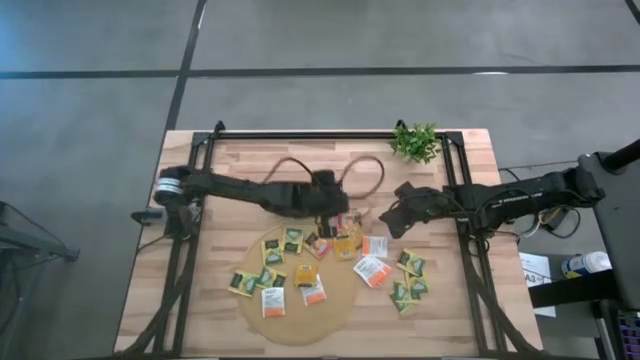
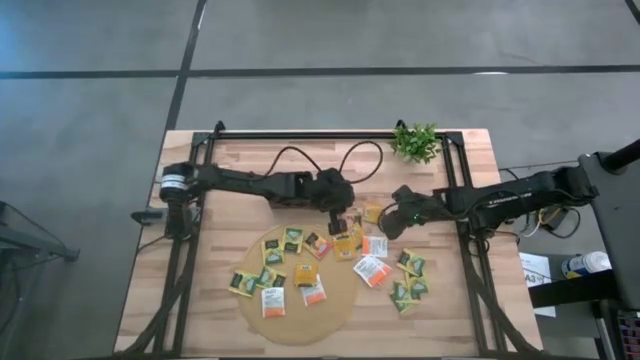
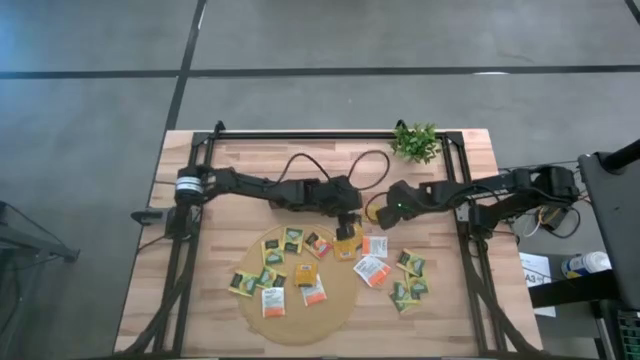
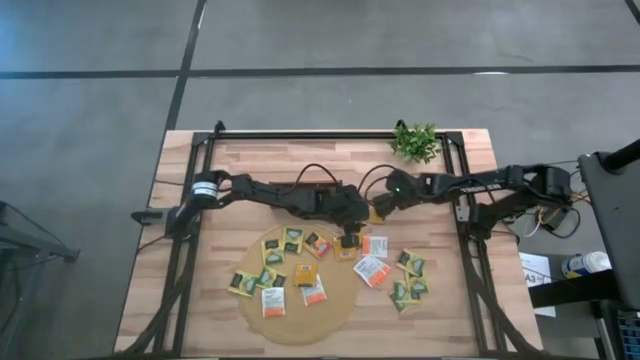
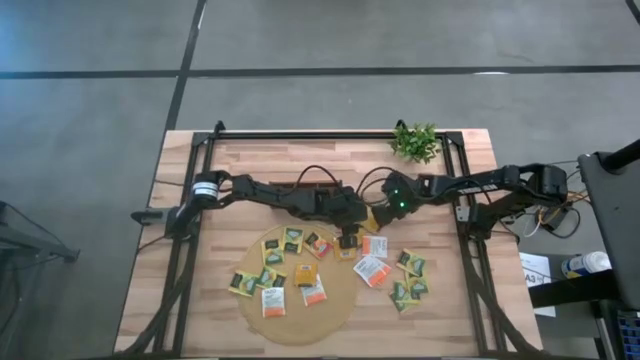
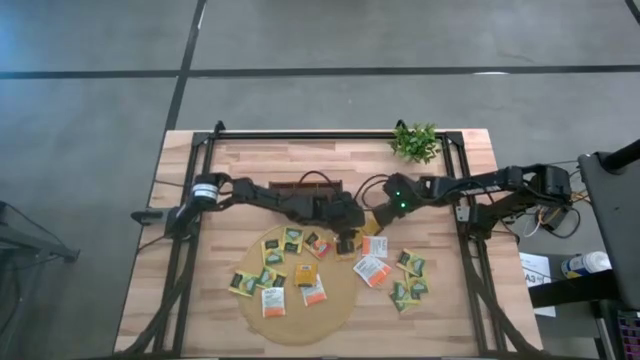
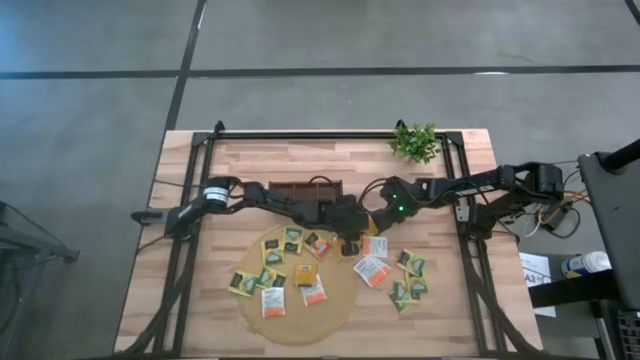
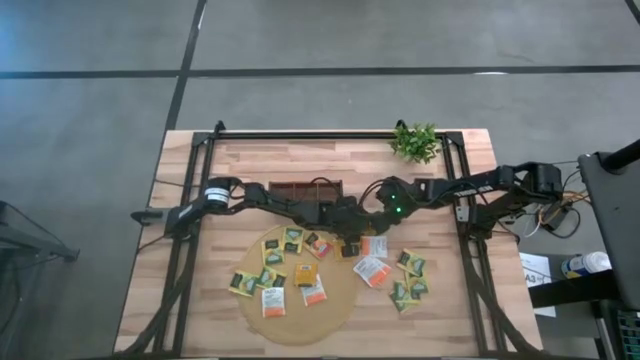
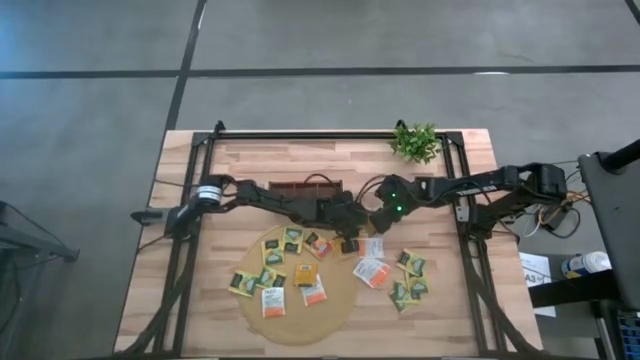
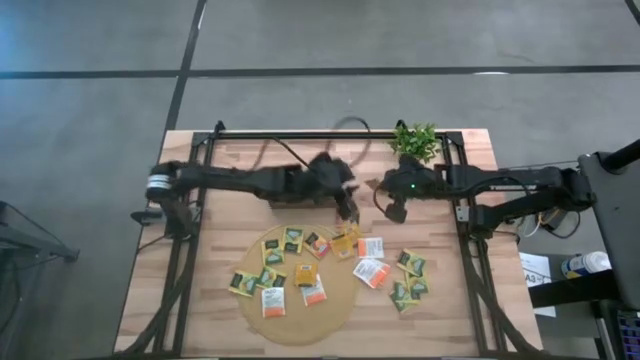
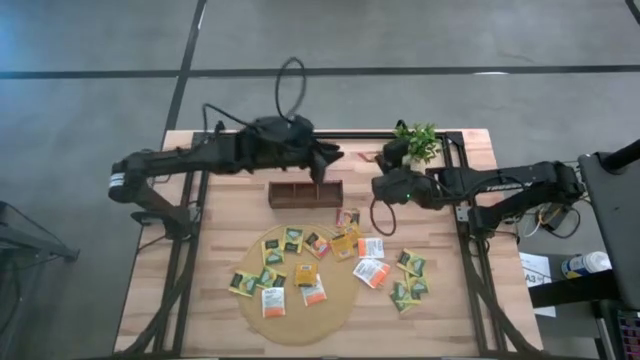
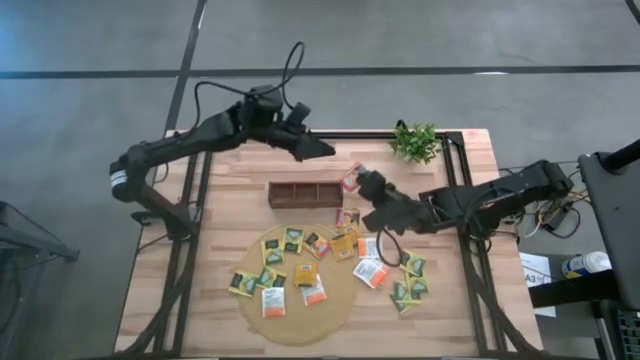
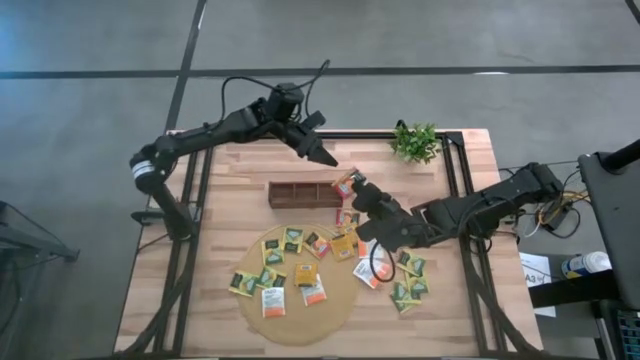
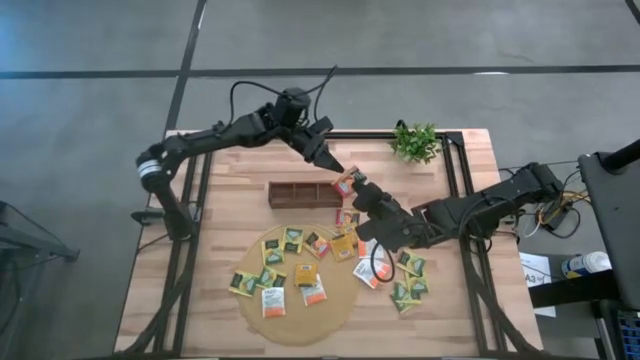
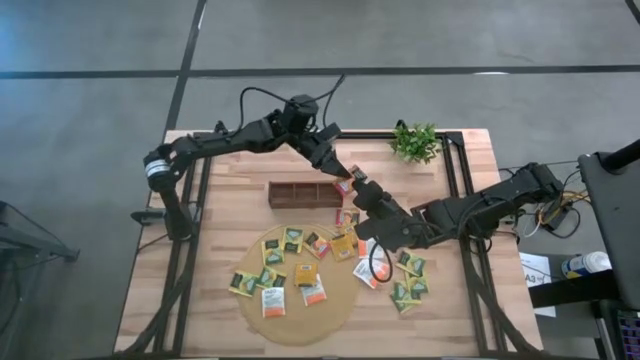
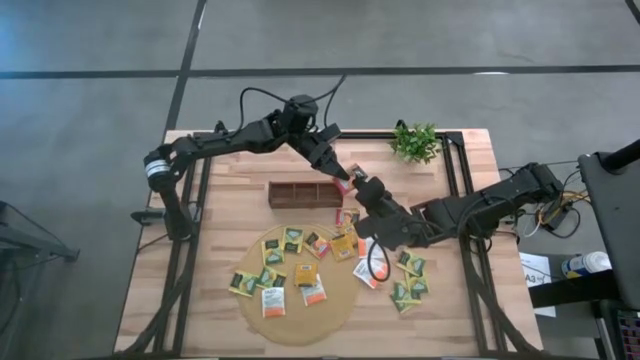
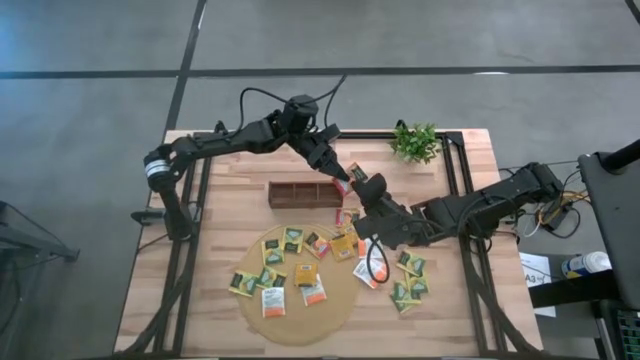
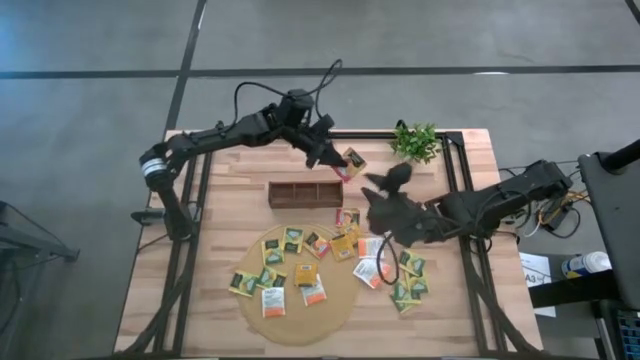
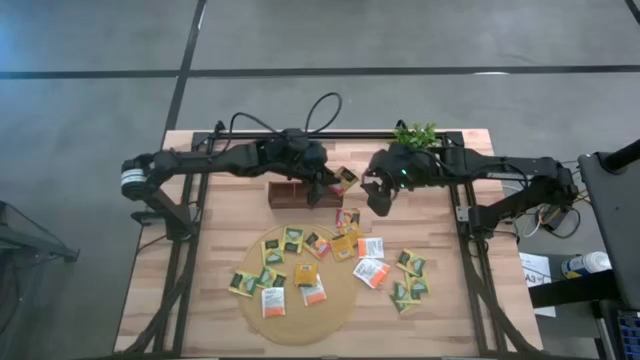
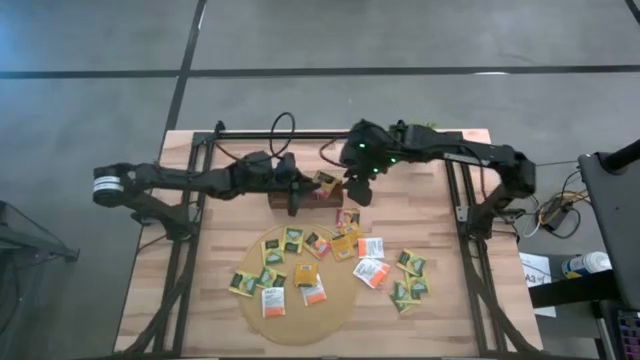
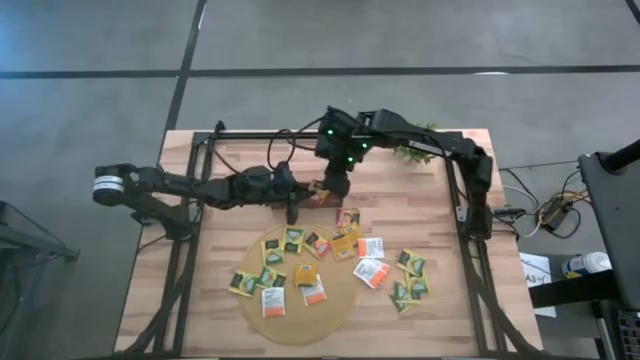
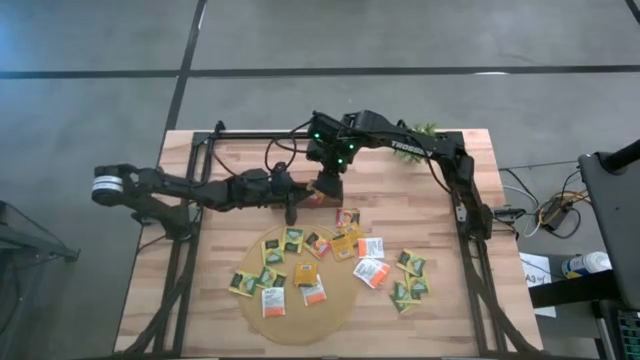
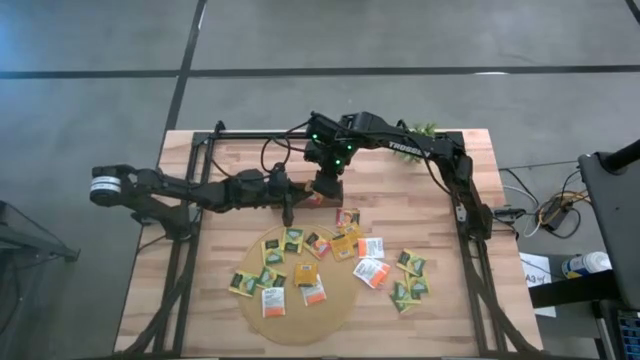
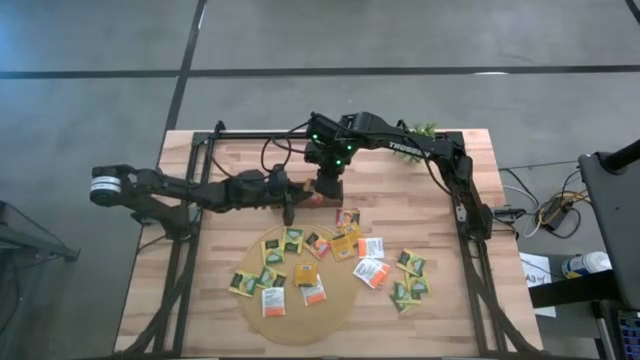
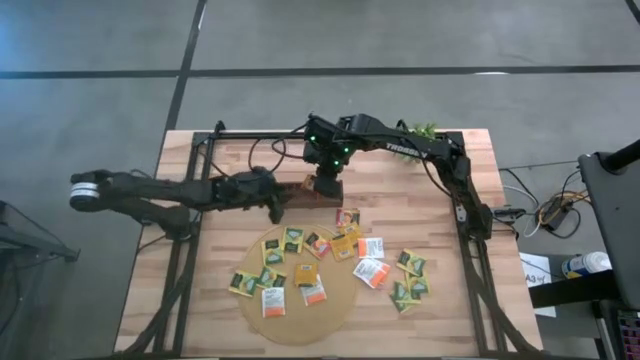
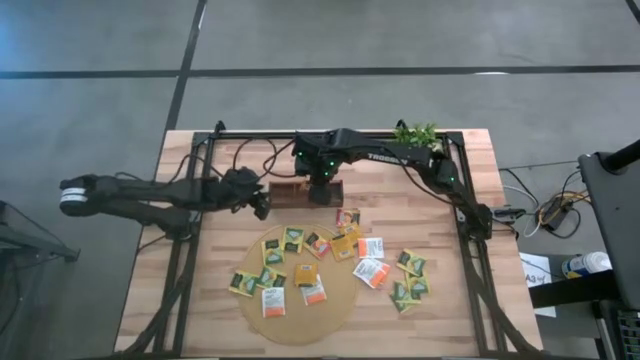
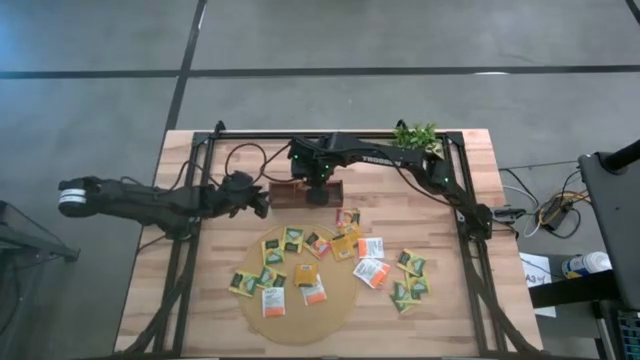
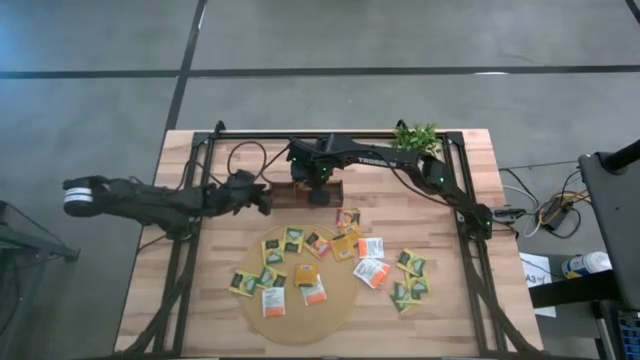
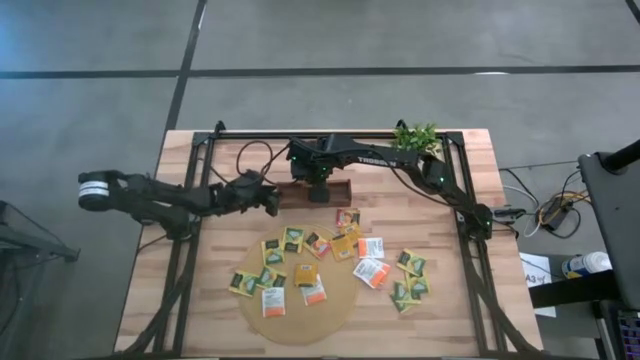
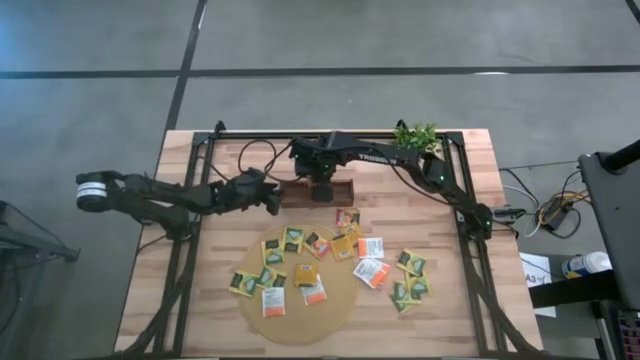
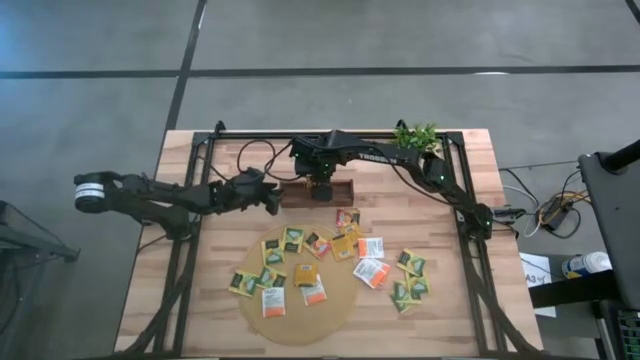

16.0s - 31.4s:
Task: Pick & Place Tea
Put the yellow tea bag into the middle section of the wooden organizer

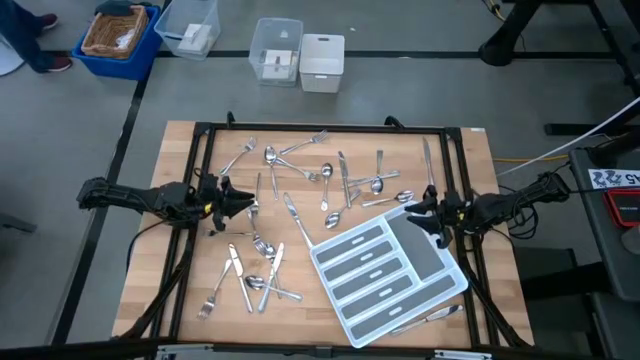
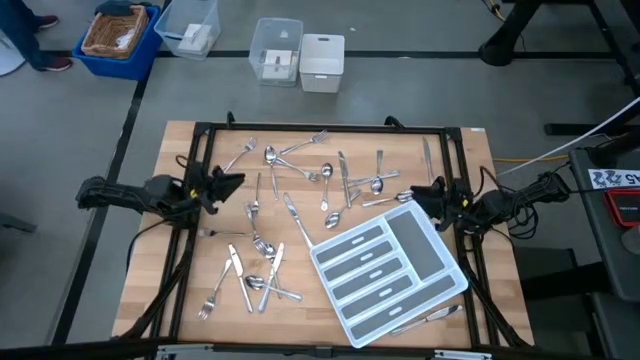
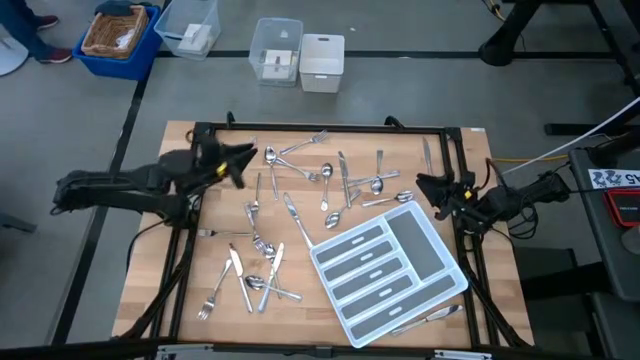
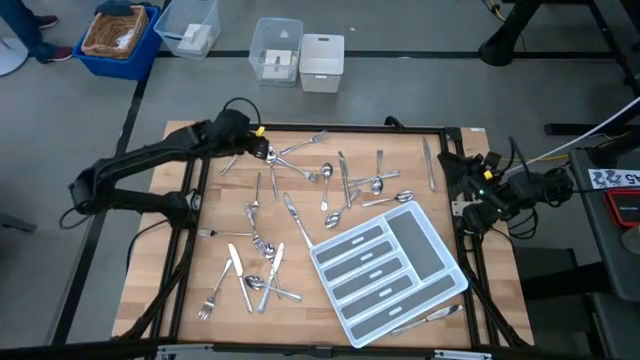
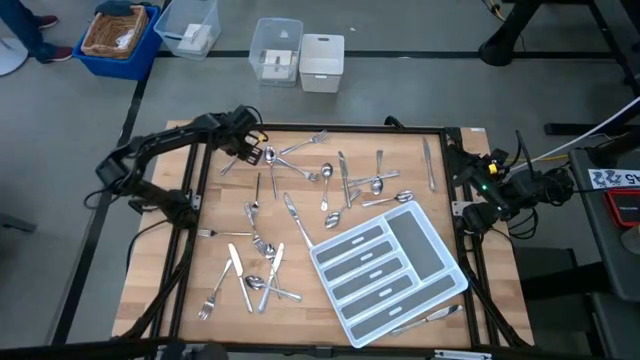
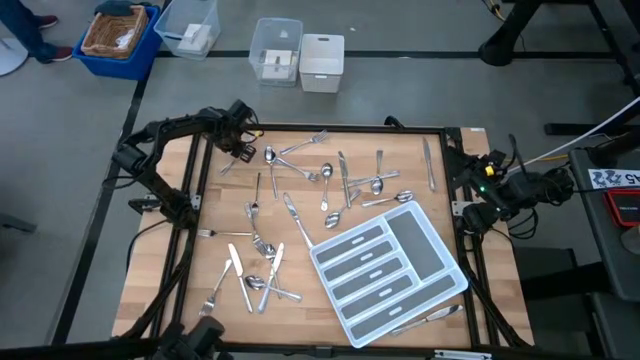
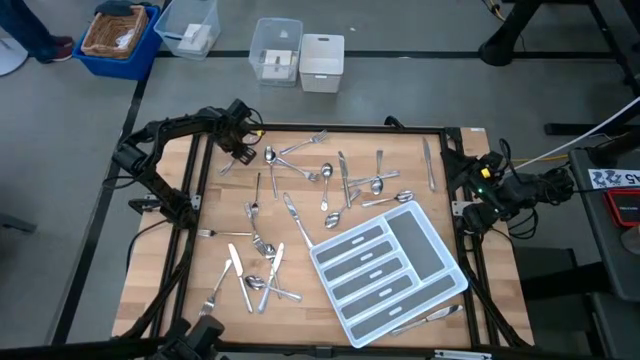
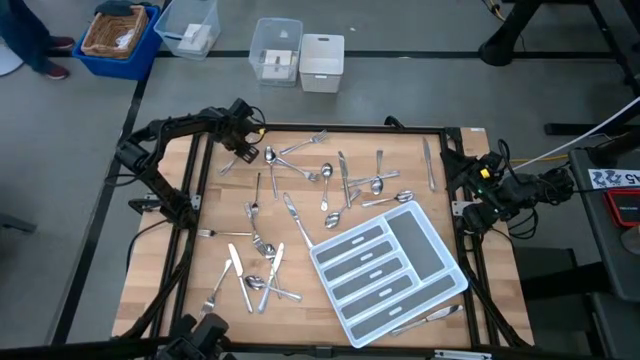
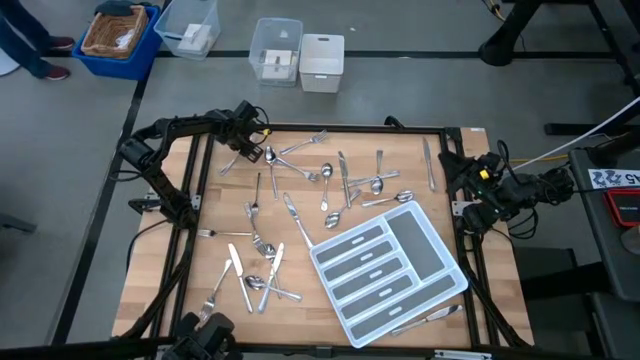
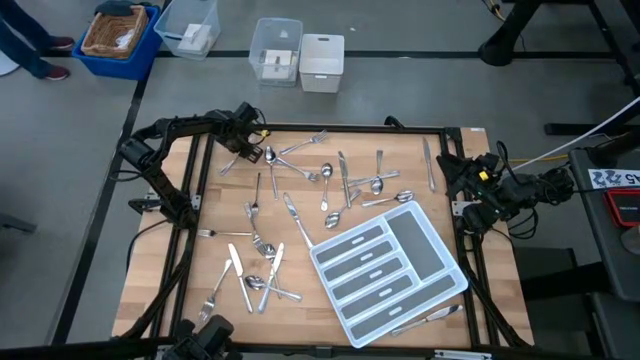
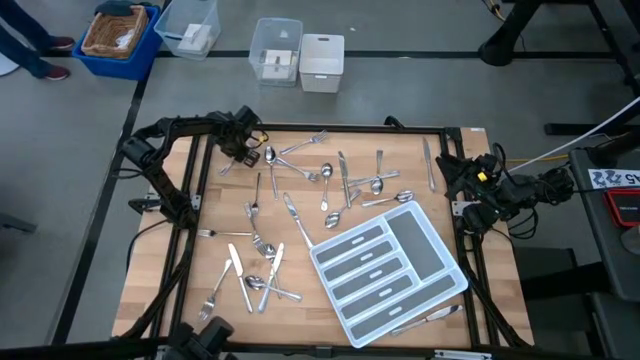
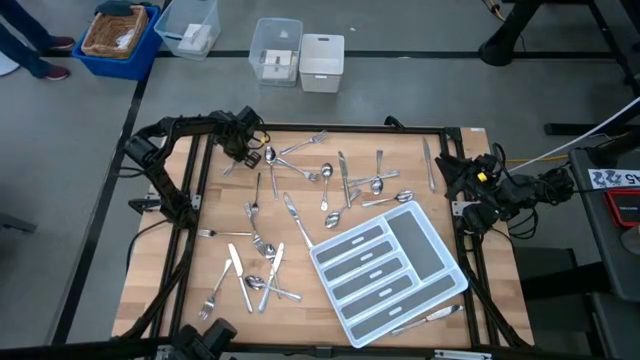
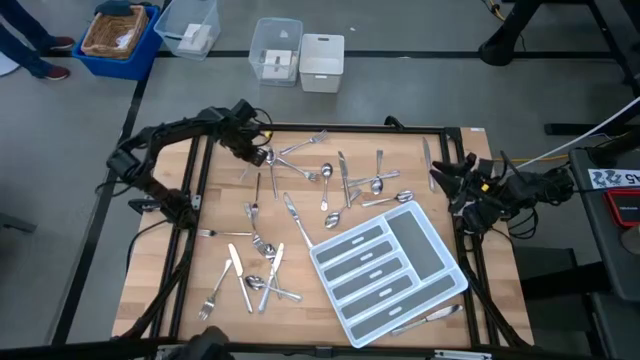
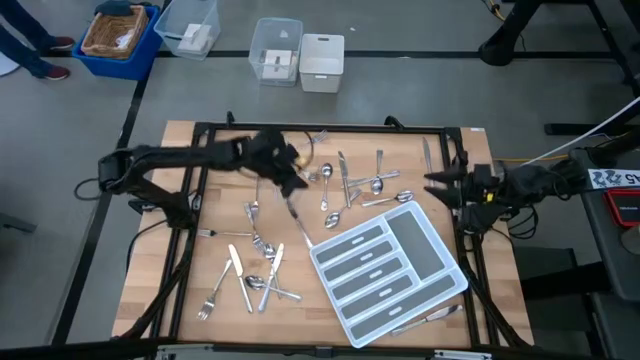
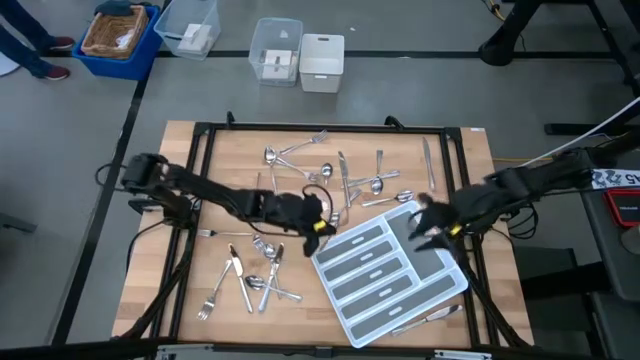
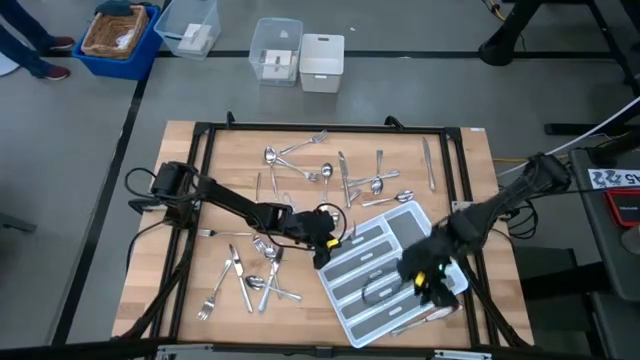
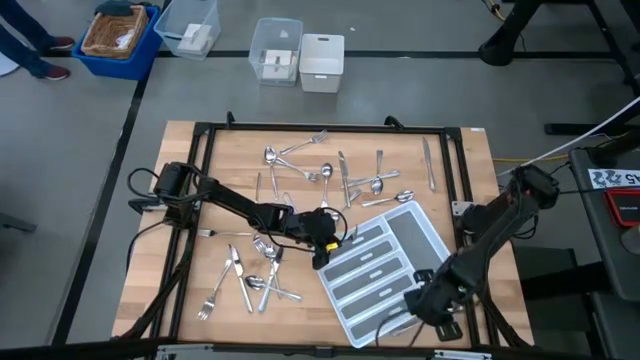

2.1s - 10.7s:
Task: Sort silverware
Put the silver fork into the silverware tray
